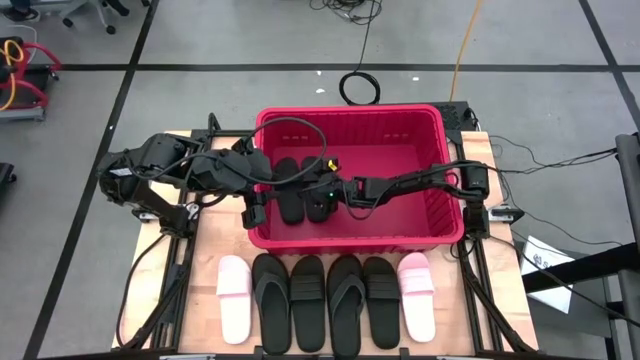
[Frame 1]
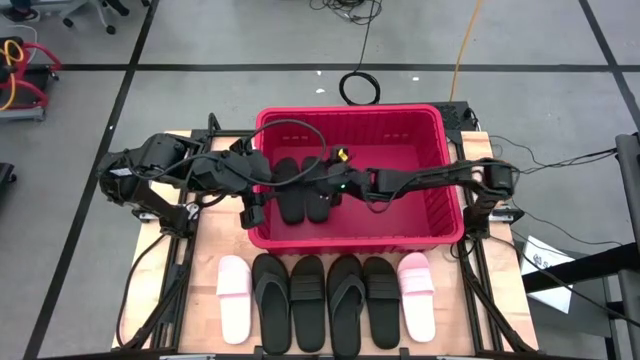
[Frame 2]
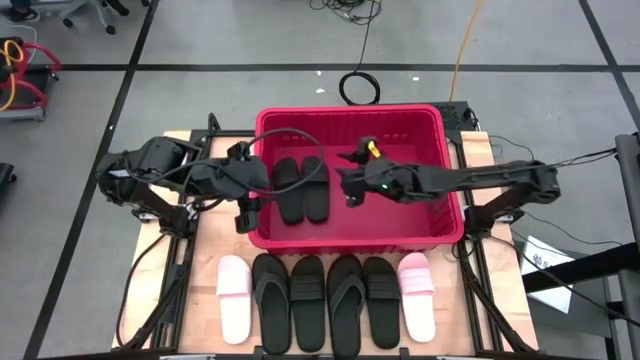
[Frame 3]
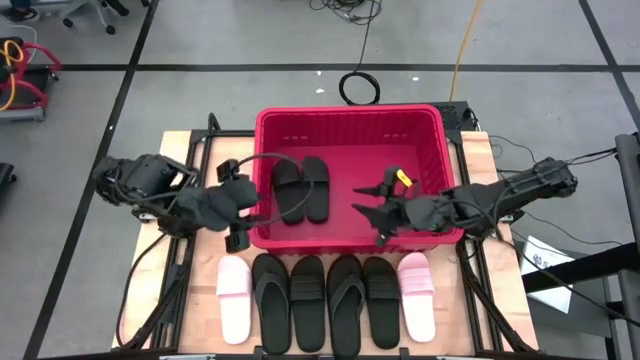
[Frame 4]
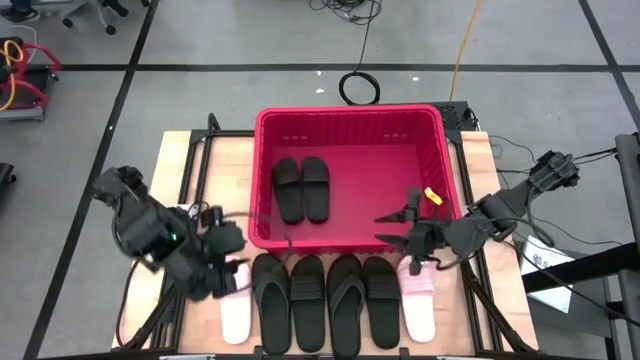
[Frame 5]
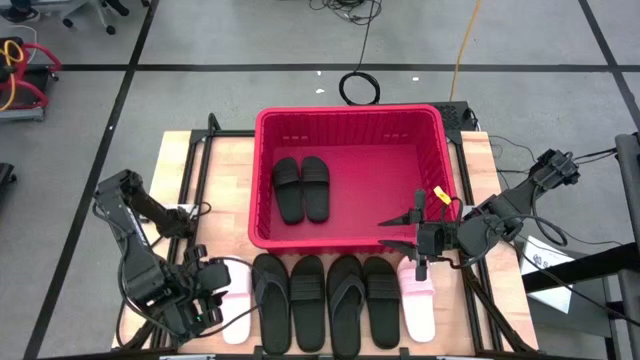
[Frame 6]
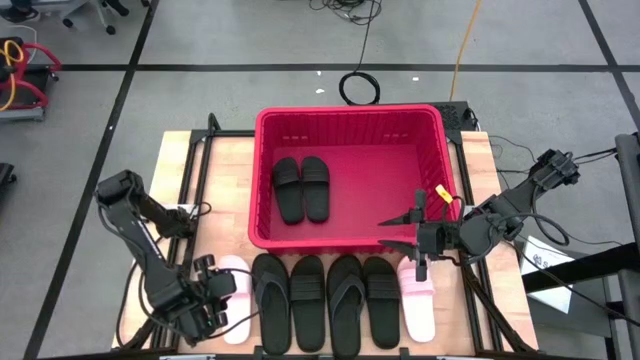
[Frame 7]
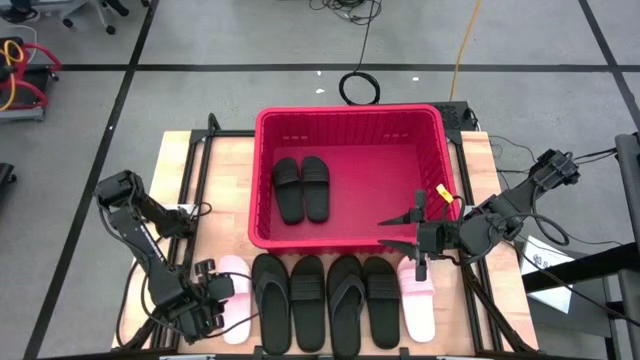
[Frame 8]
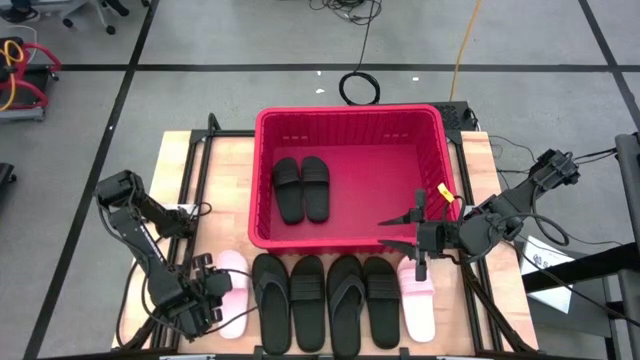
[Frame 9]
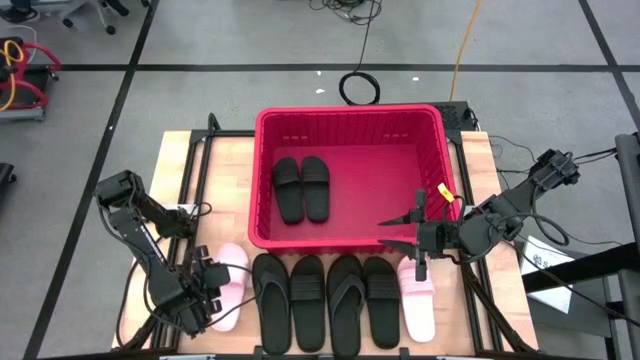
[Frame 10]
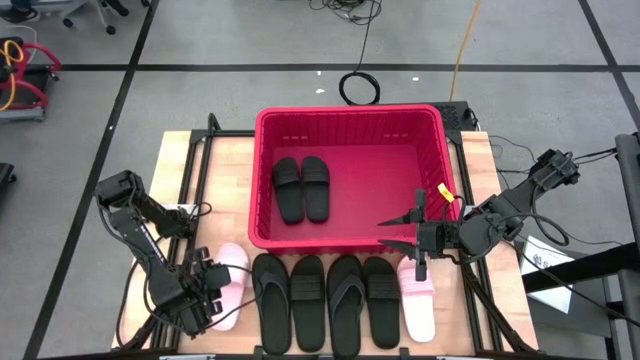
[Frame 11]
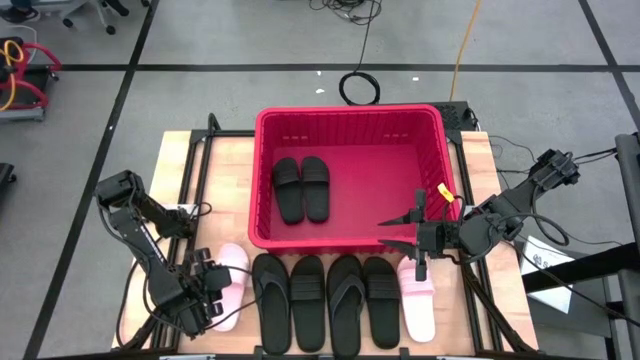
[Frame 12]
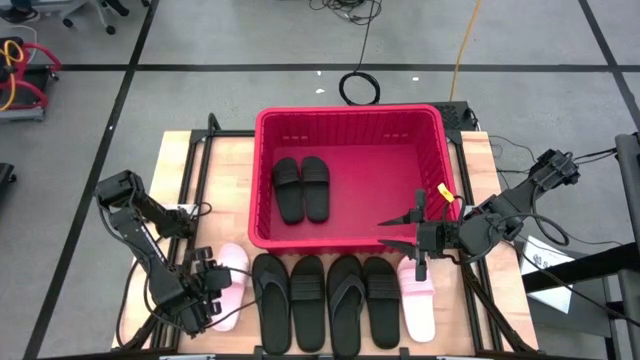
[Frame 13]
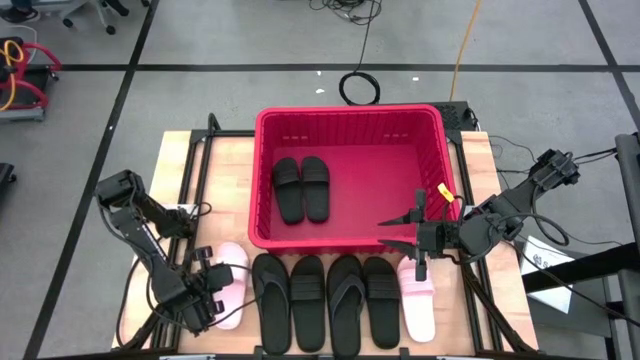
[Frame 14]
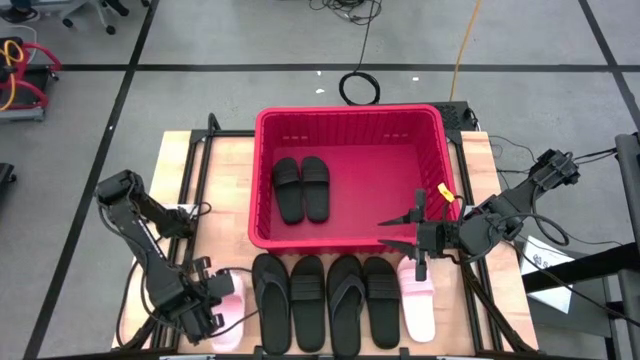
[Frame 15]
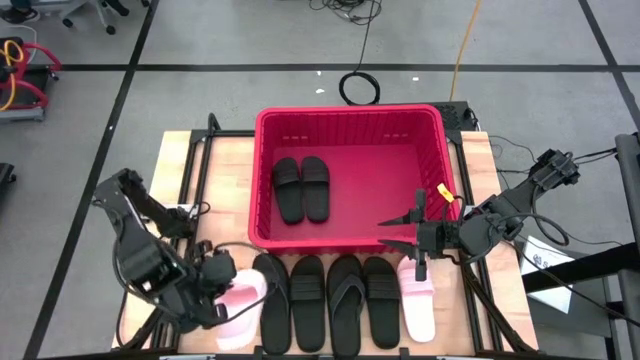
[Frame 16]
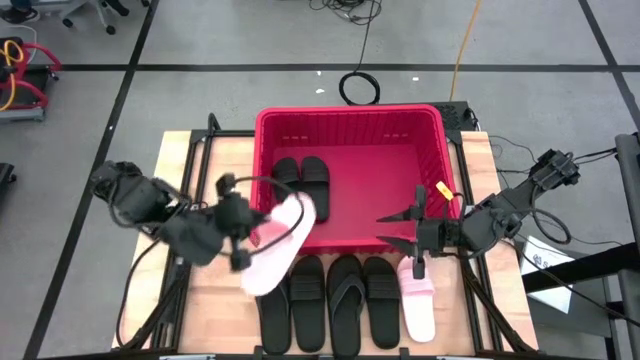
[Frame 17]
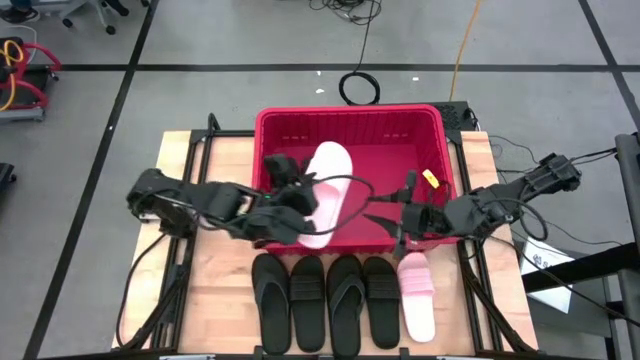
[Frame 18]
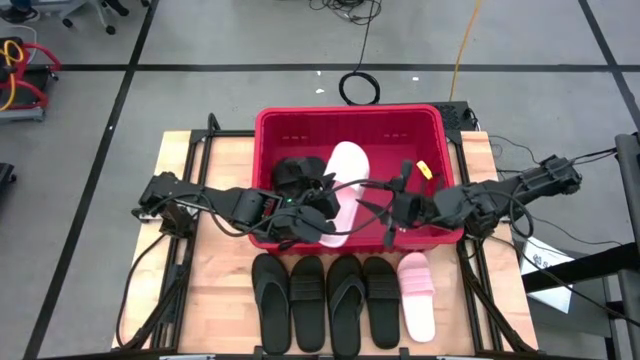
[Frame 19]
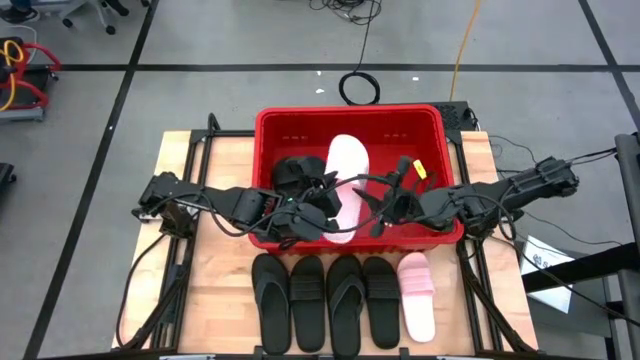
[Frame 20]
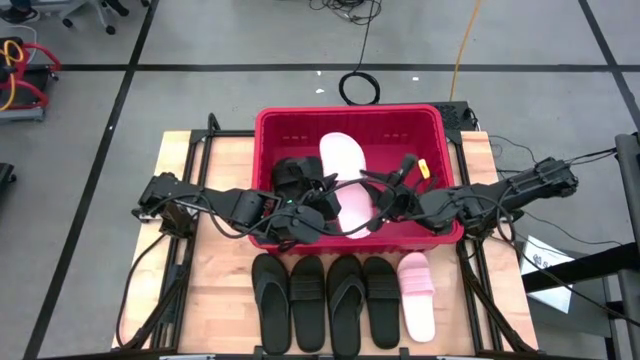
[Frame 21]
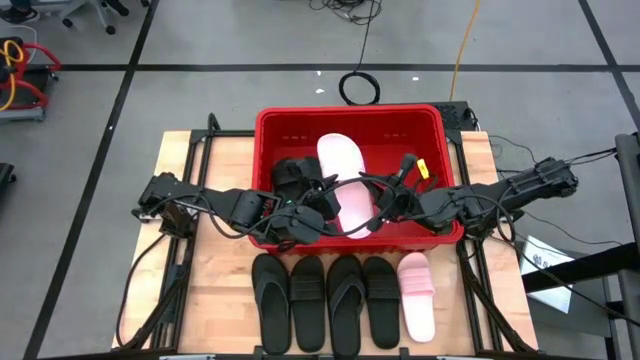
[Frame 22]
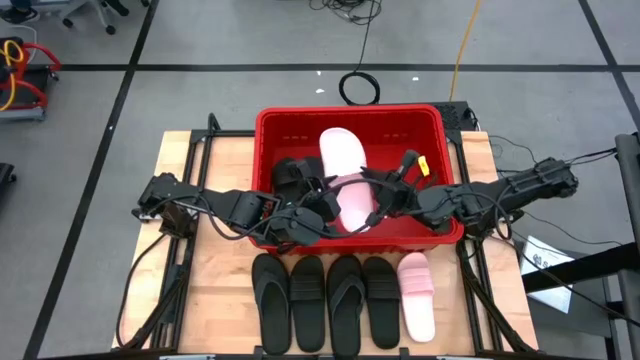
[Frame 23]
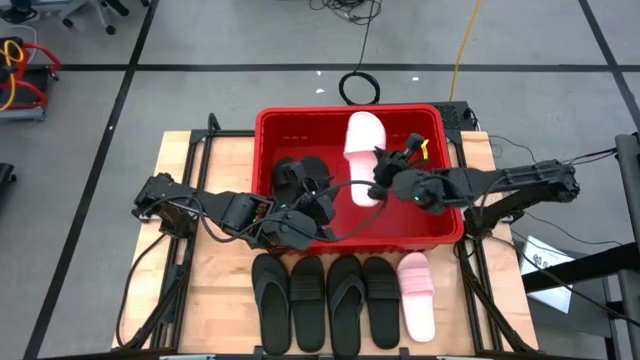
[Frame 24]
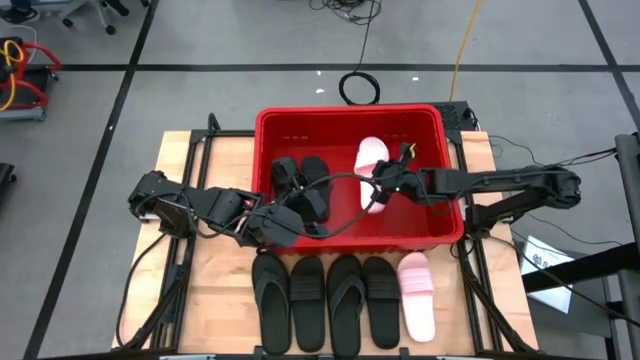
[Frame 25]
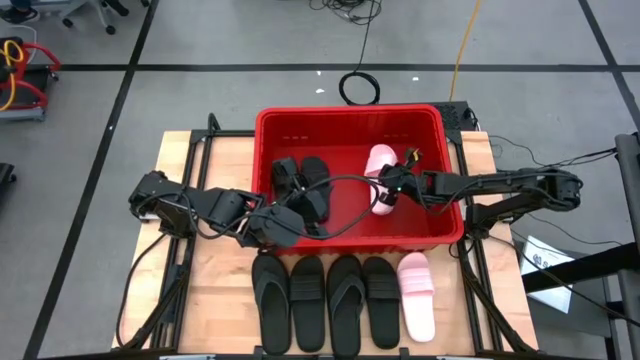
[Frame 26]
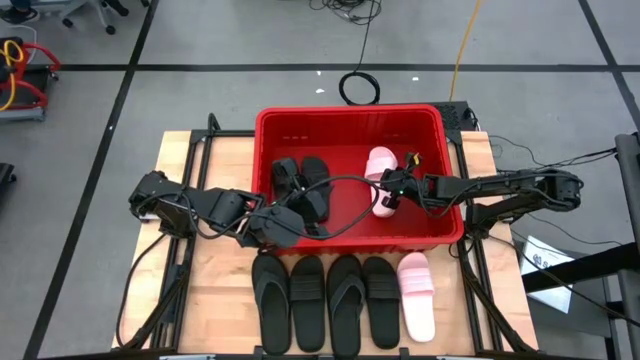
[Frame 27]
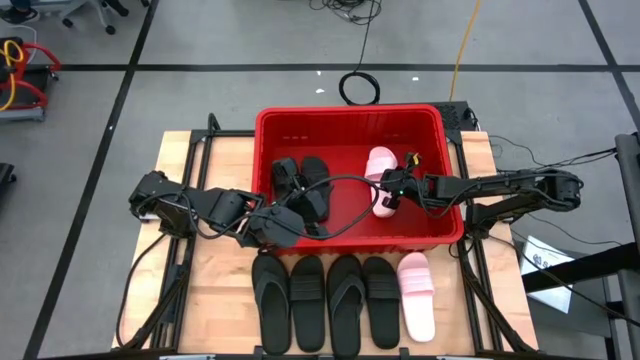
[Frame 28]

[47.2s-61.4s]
Task: Pick and place slides into bin
Put the pink slide into the red bin

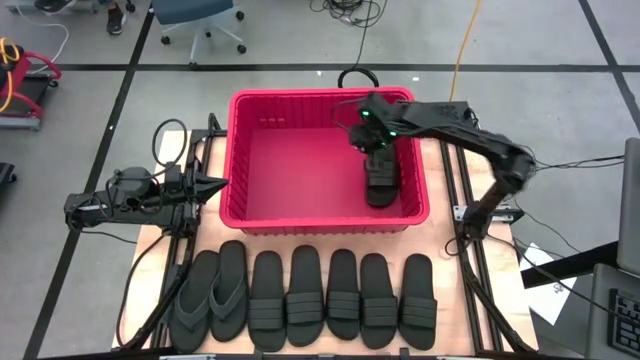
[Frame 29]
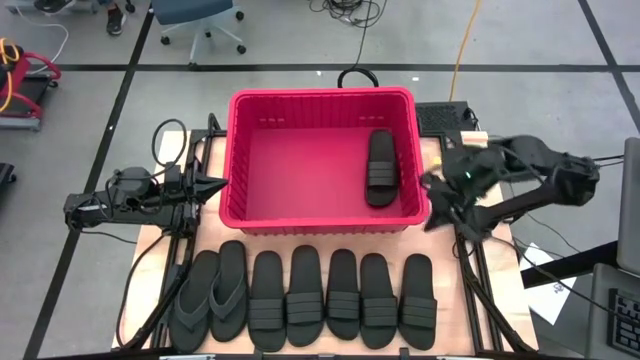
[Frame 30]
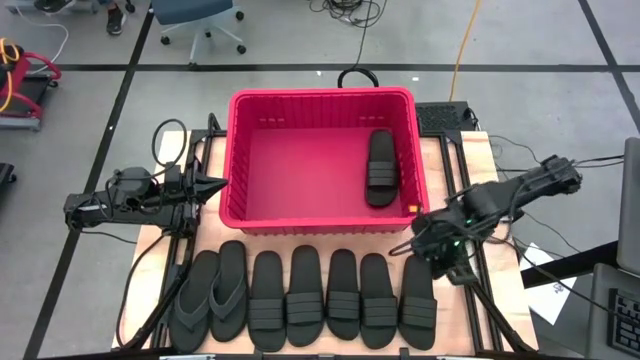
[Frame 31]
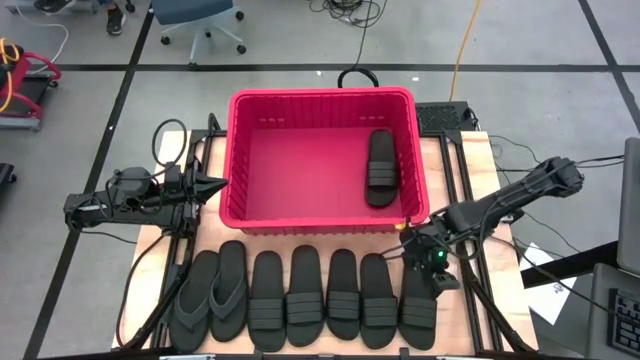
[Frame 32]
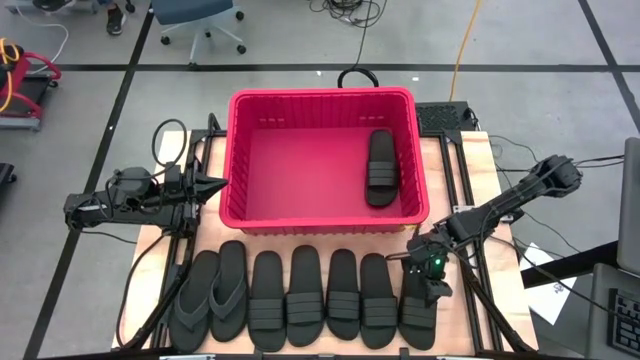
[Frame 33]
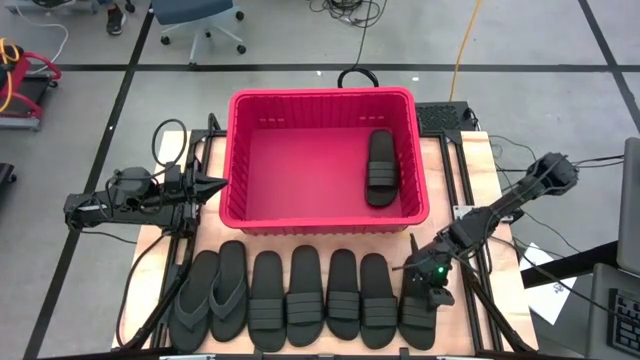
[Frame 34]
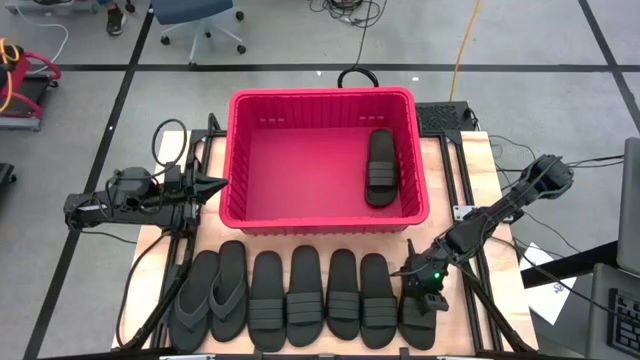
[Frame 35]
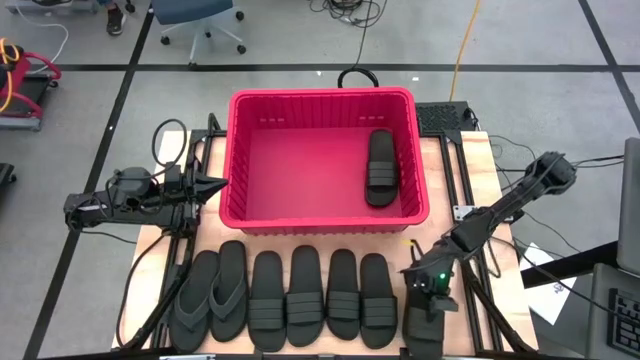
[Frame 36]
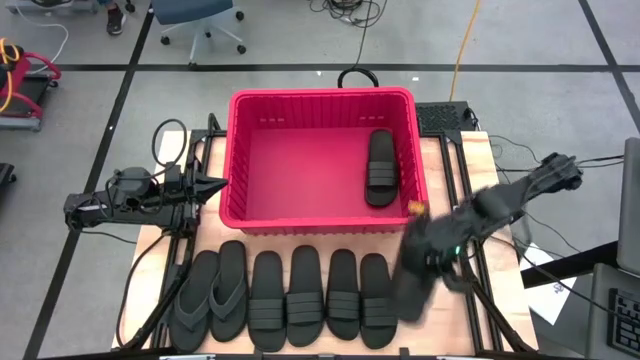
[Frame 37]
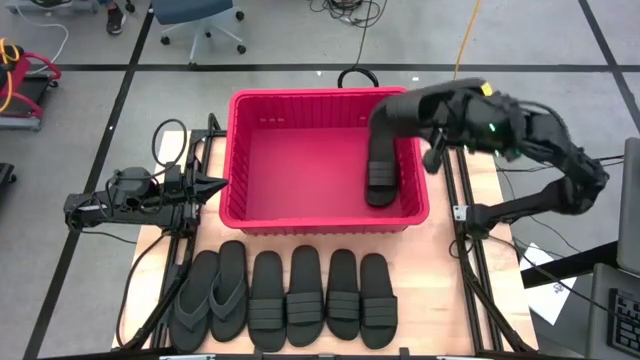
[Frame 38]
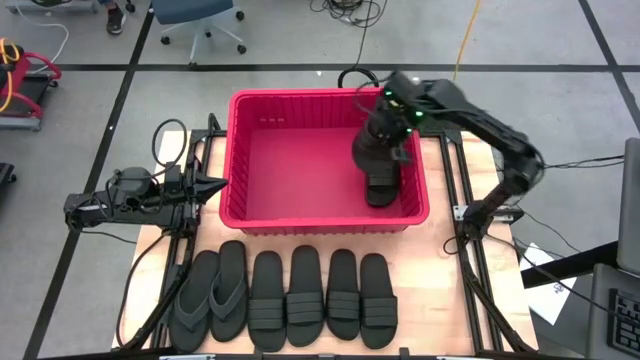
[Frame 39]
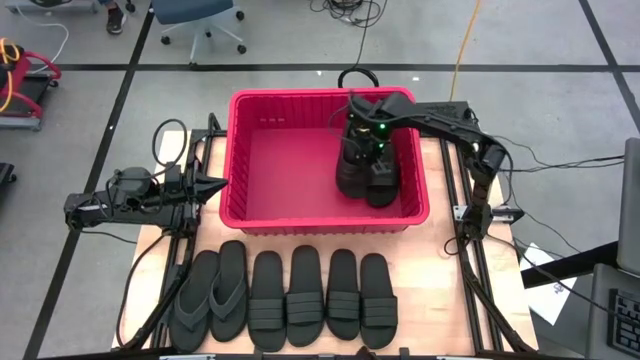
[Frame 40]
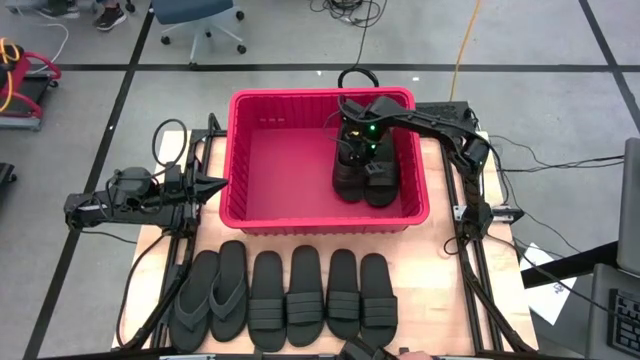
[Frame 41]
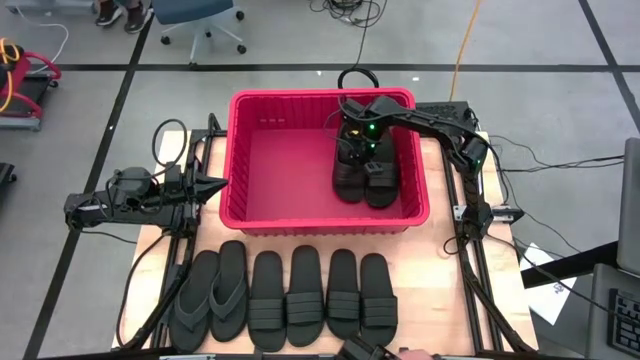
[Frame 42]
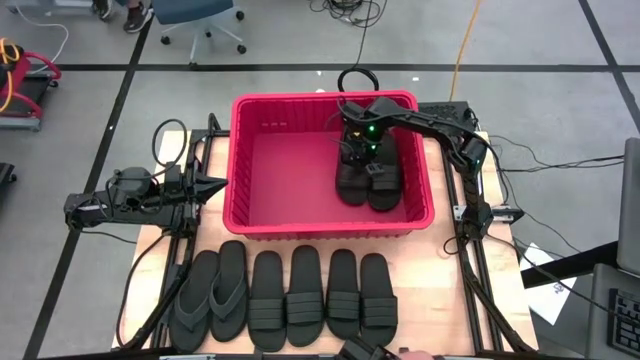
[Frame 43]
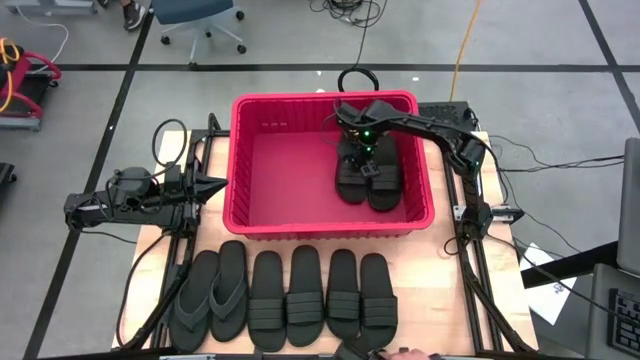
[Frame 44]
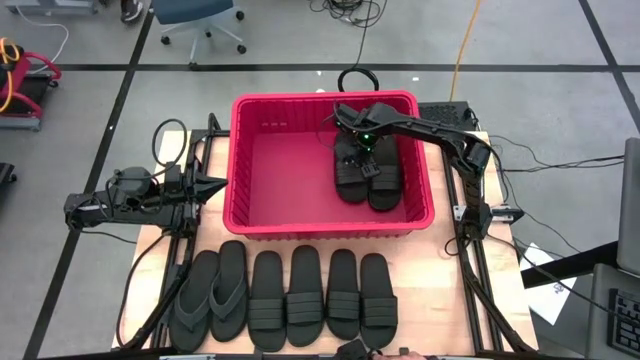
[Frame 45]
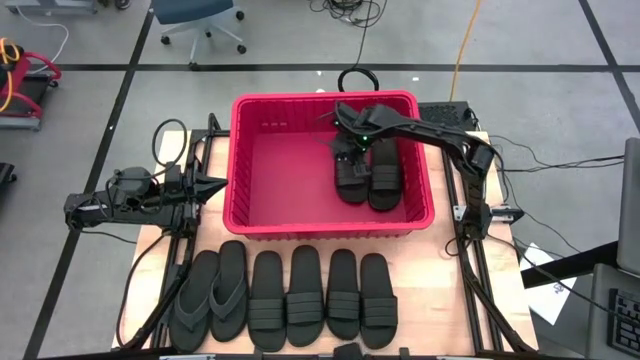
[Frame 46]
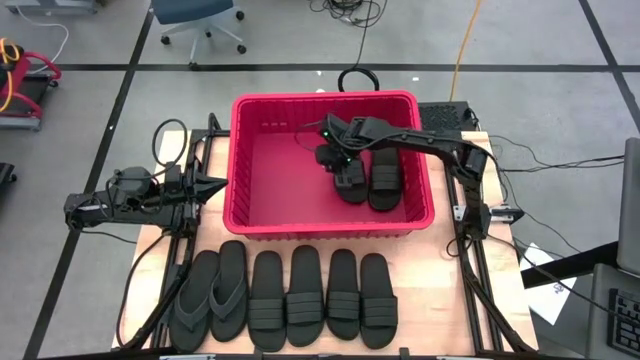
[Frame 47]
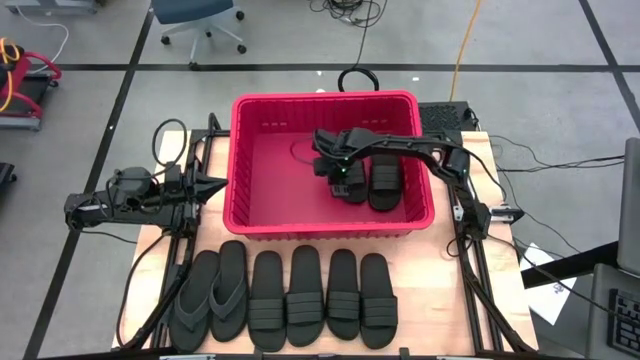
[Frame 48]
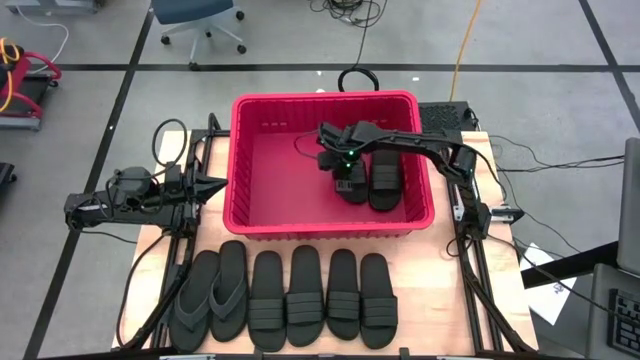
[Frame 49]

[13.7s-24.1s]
Task: Pick and place slides into bin
Put the black slide into the red bin
